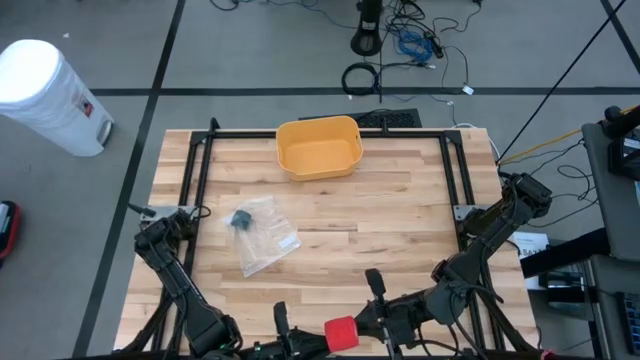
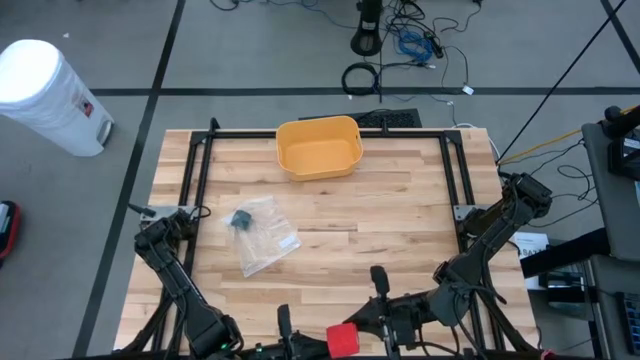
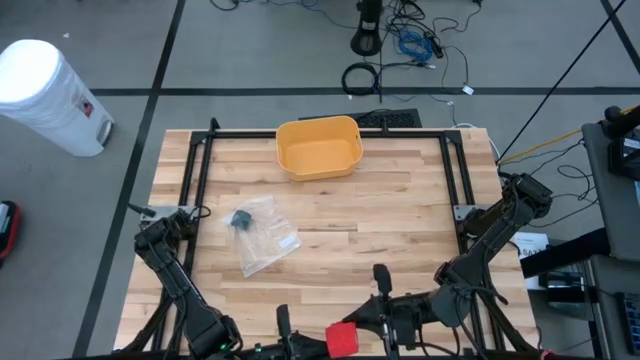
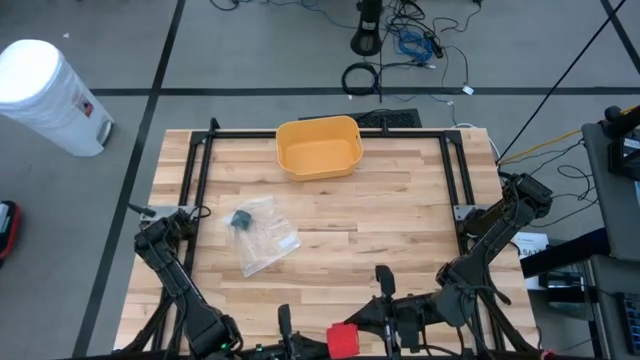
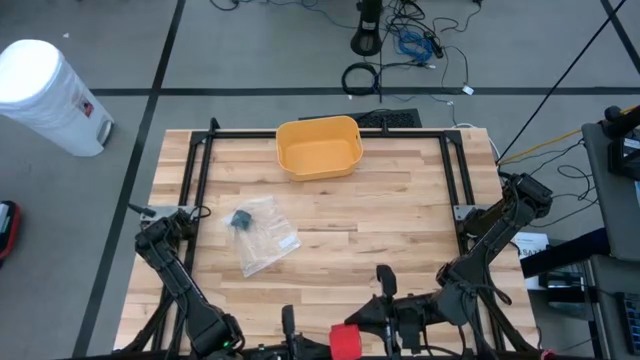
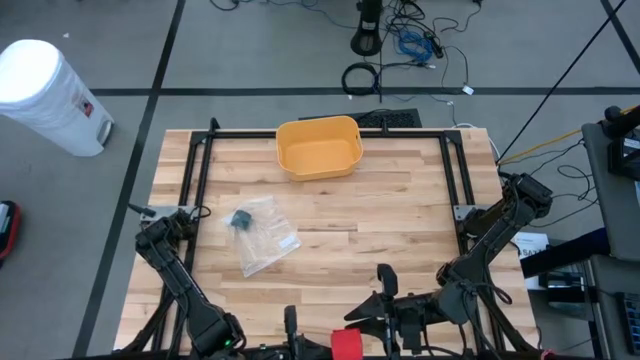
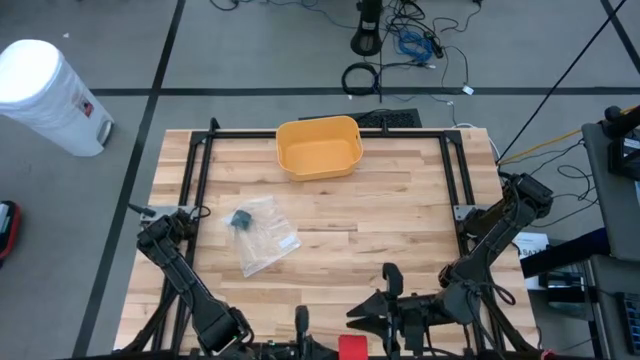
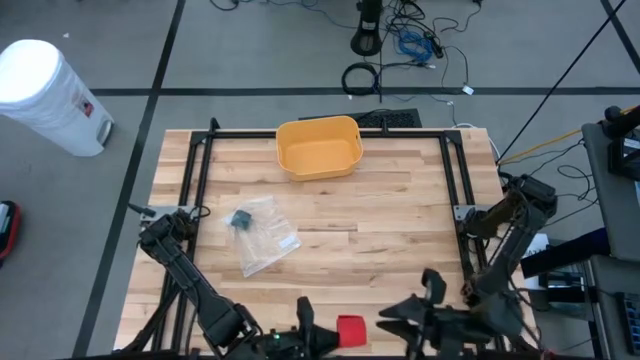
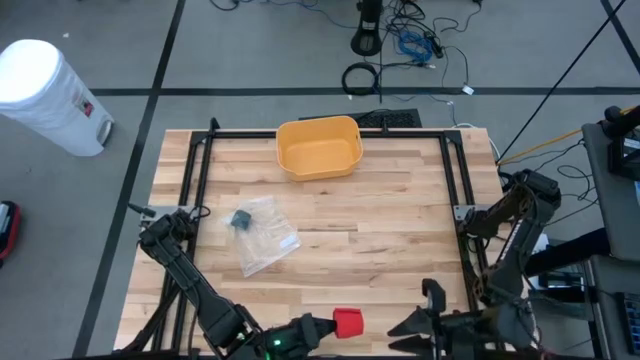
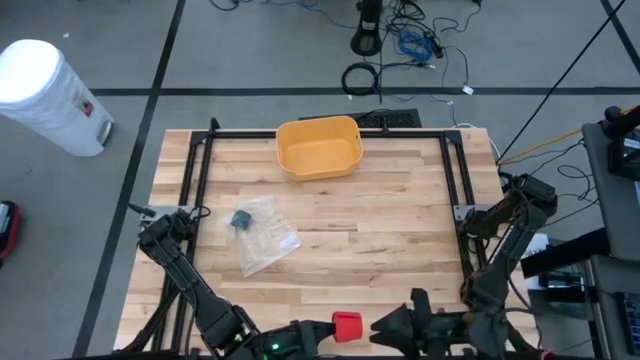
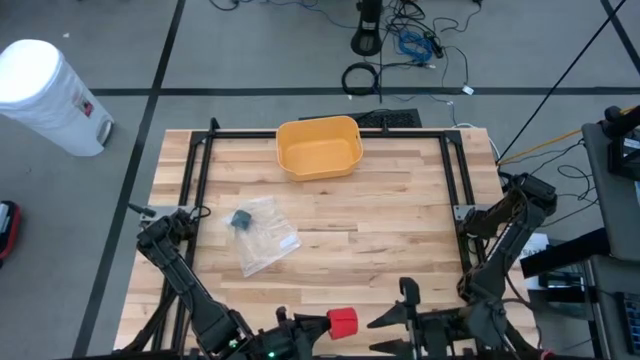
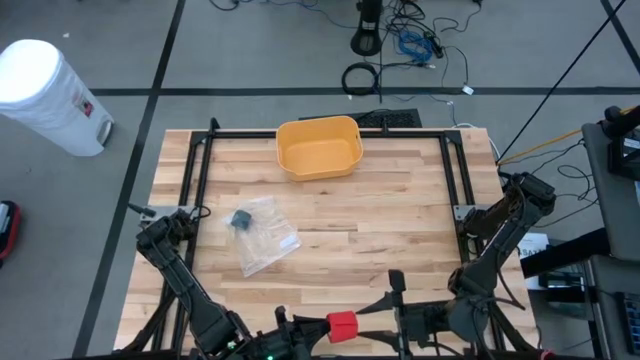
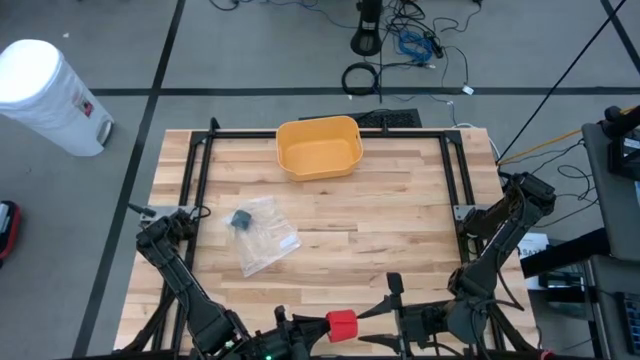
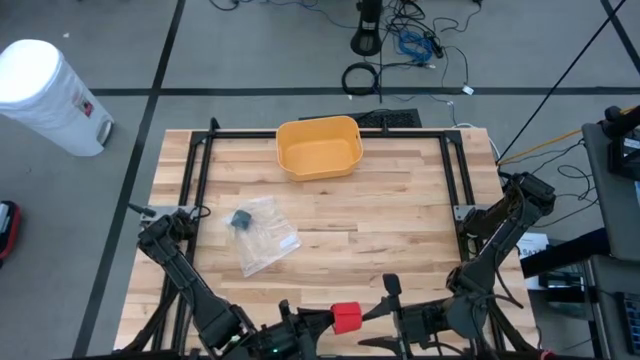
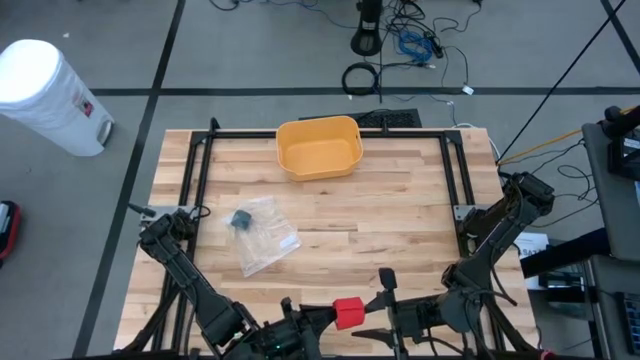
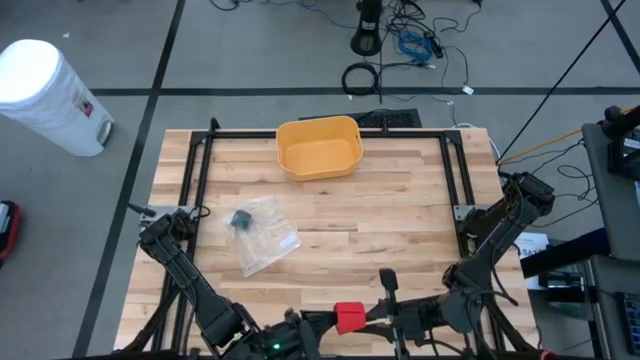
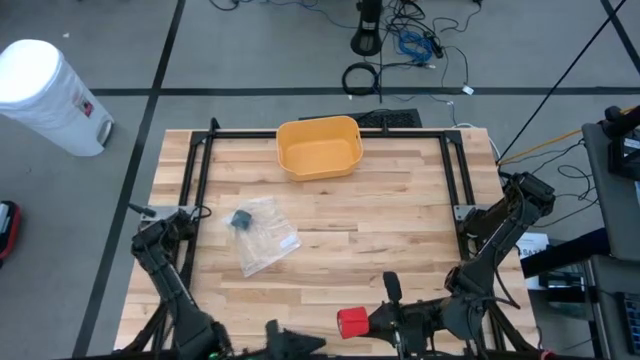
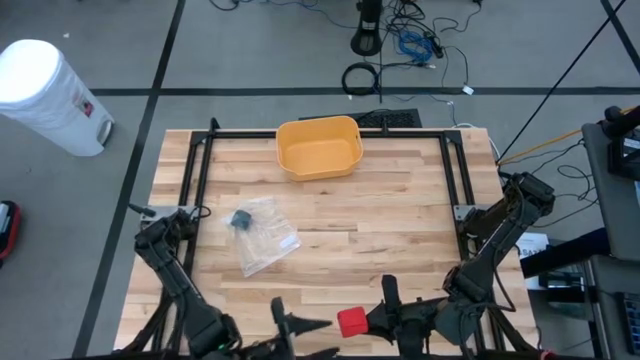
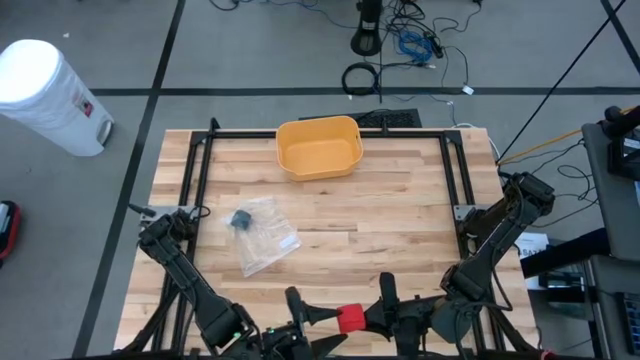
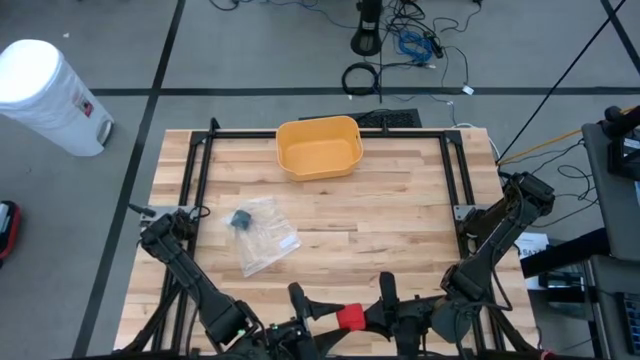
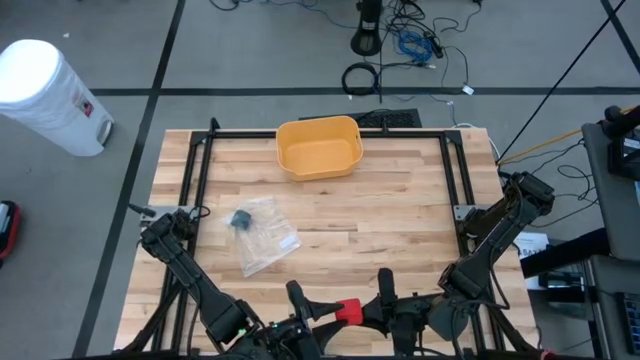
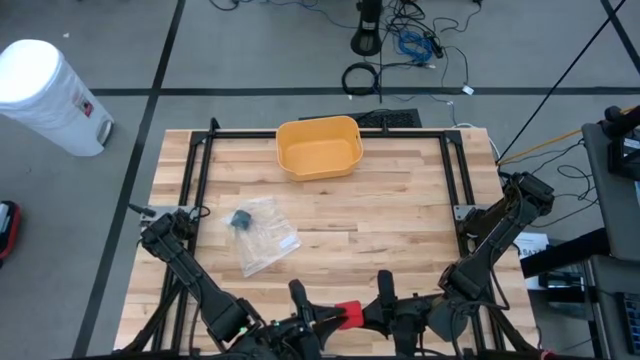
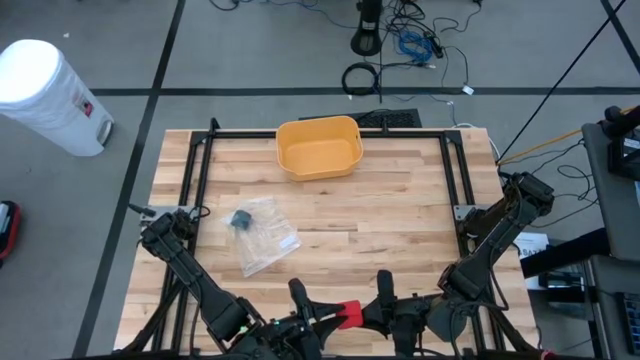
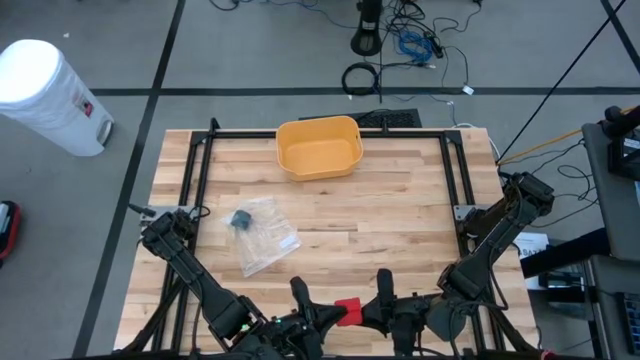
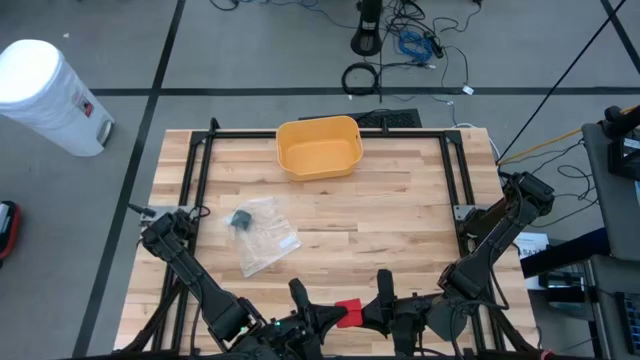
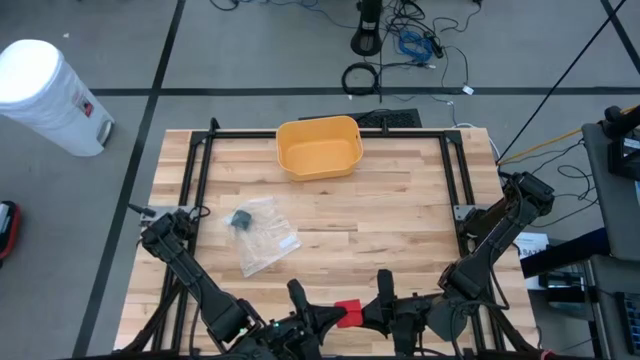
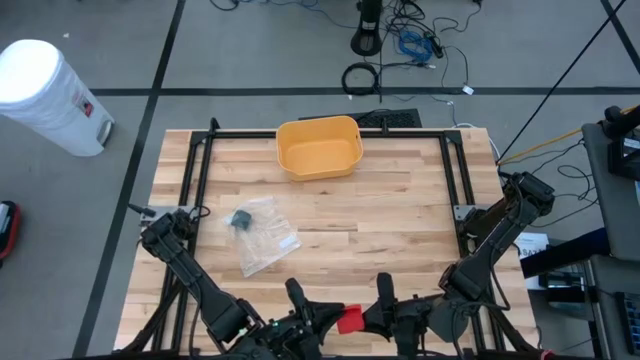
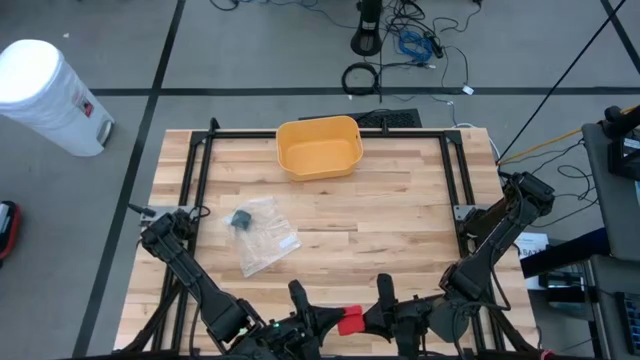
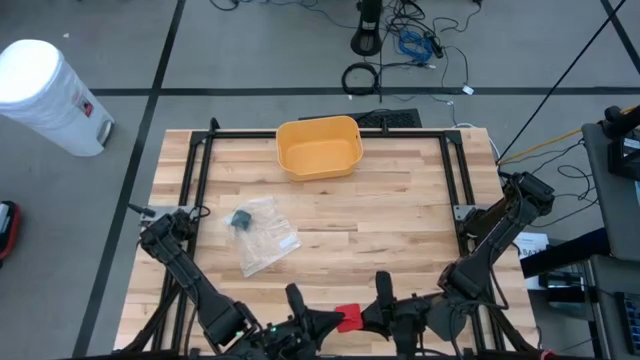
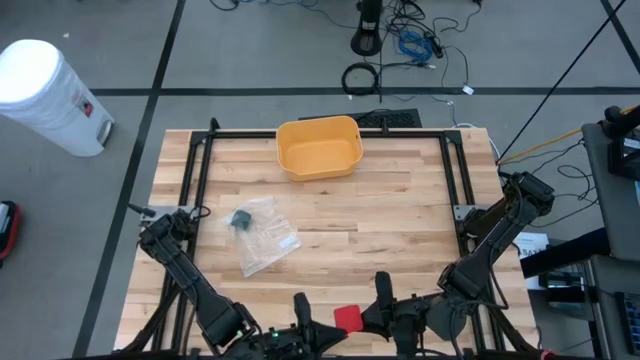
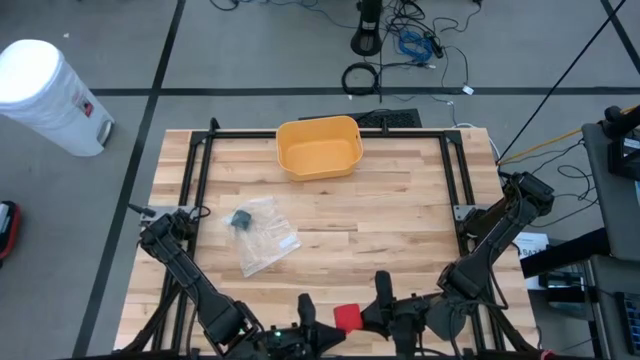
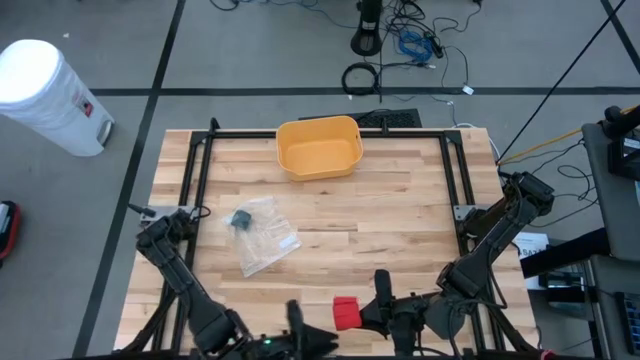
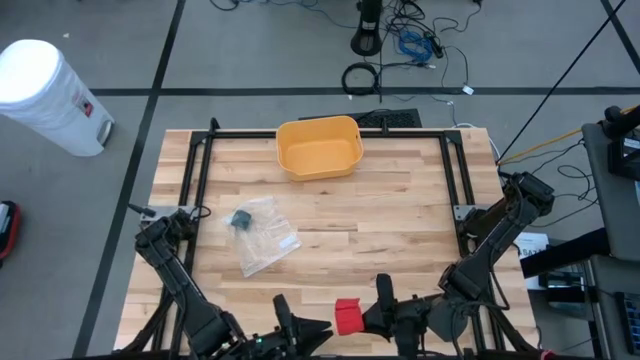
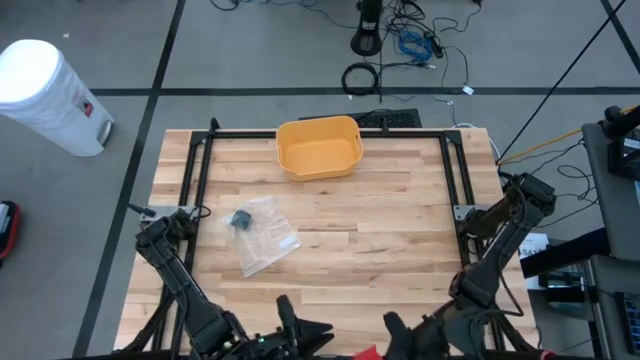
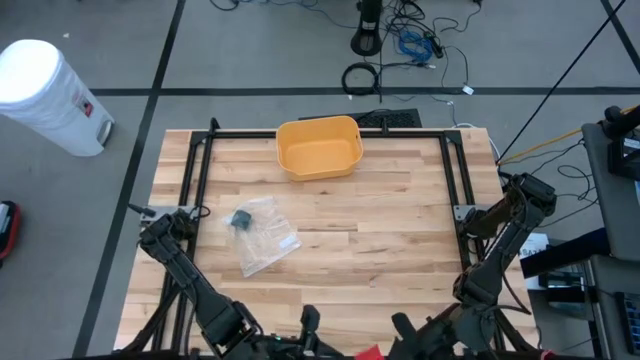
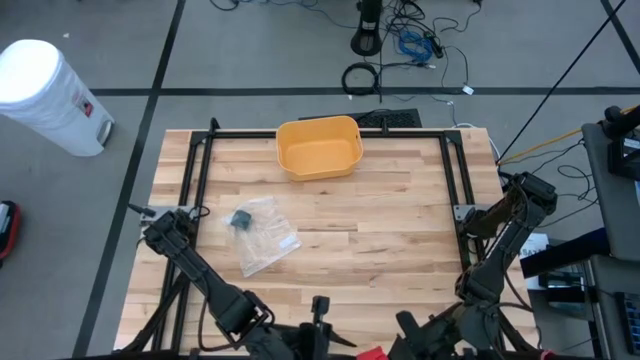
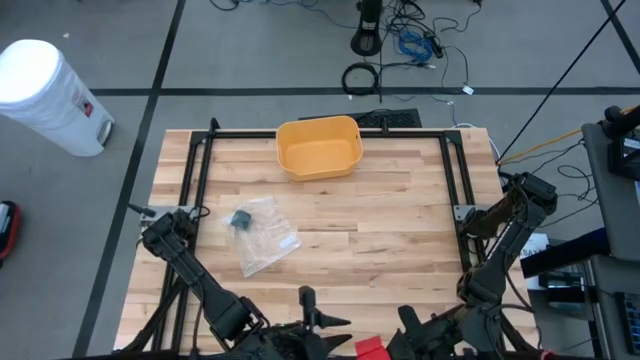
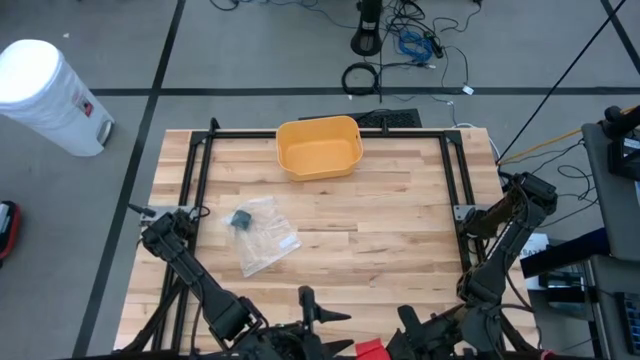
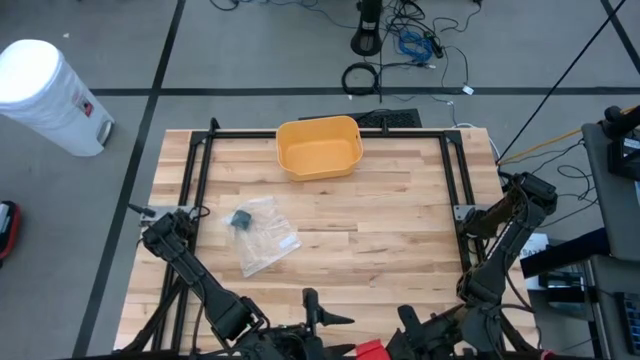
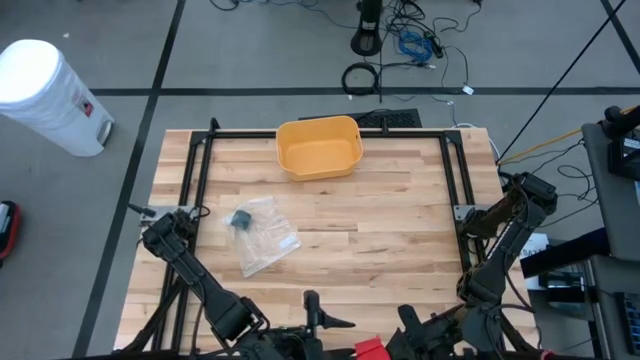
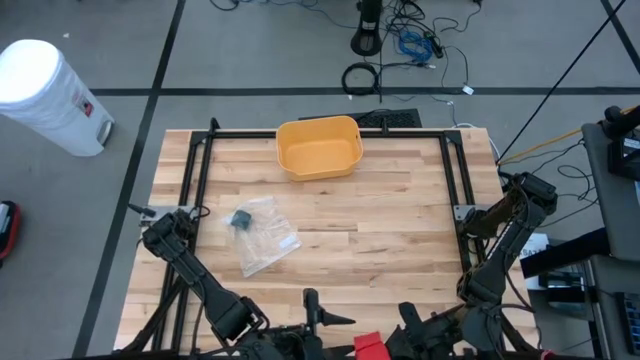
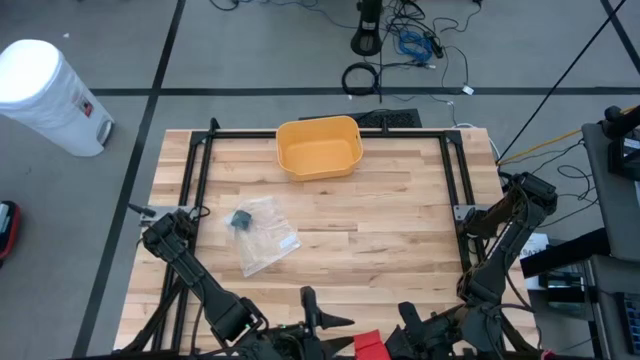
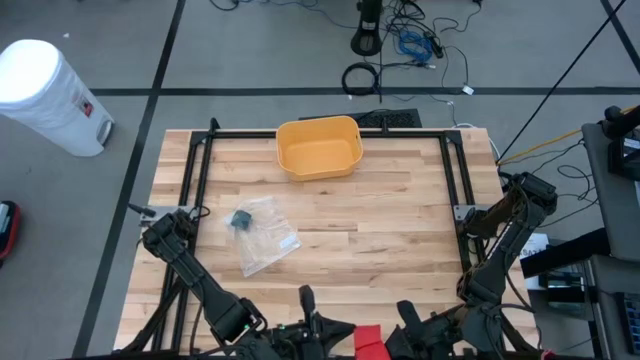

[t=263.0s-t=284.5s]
Task: Roll bandage
Roll the red bandage

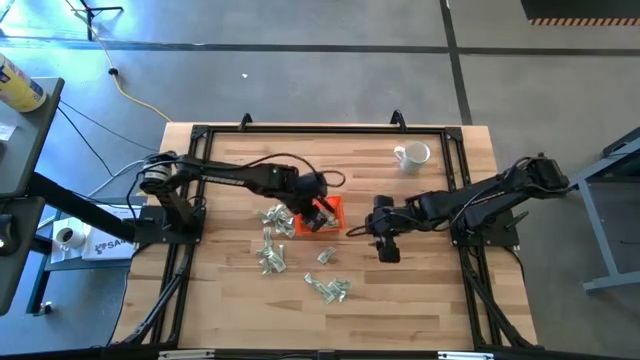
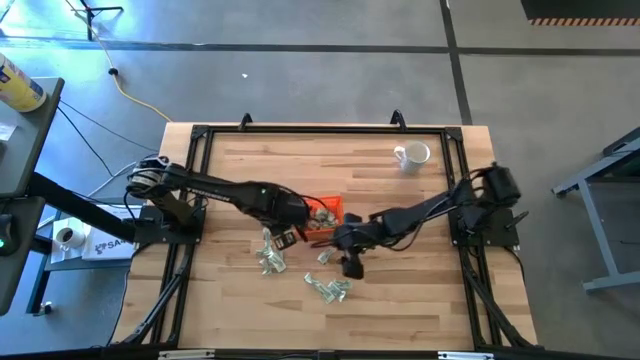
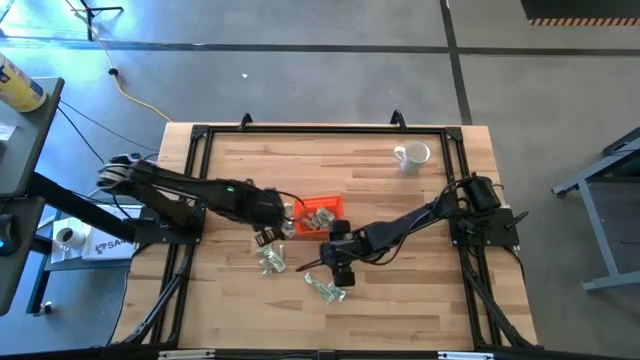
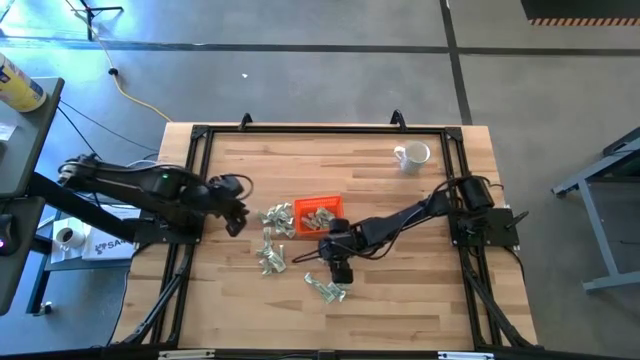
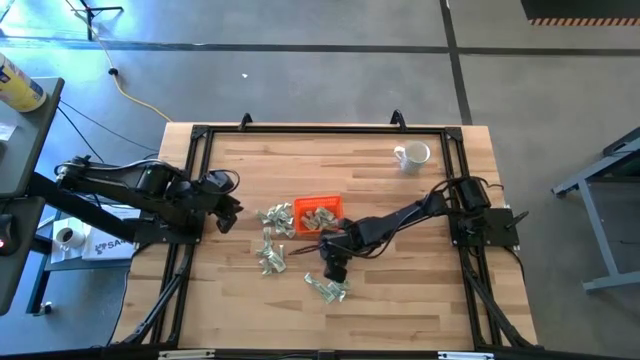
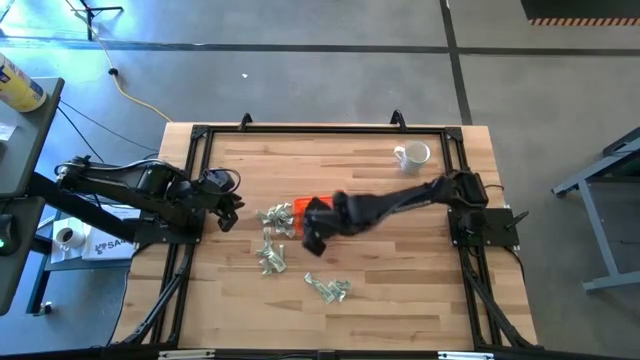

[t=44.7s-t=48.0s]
Task: Pick and place Stevia / Truvia into bins
Put the stevia packet into the orange bin
